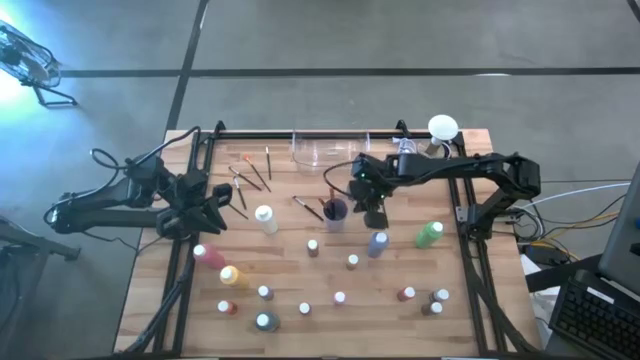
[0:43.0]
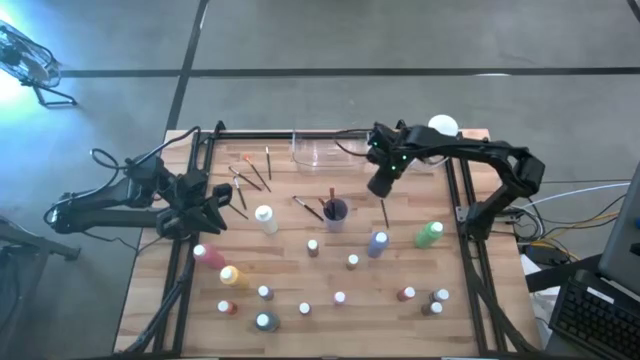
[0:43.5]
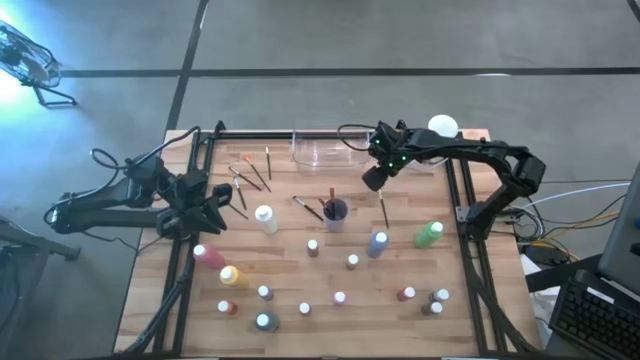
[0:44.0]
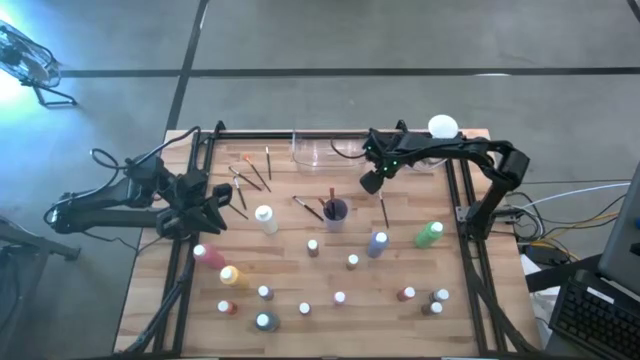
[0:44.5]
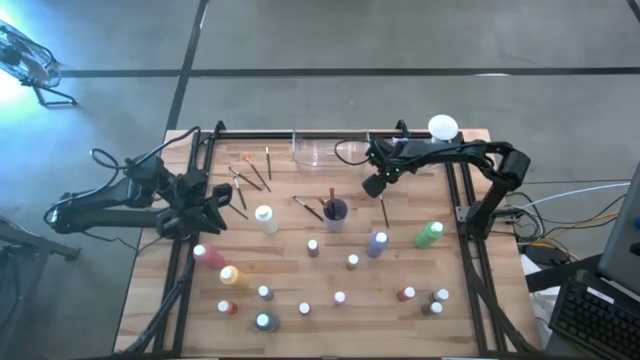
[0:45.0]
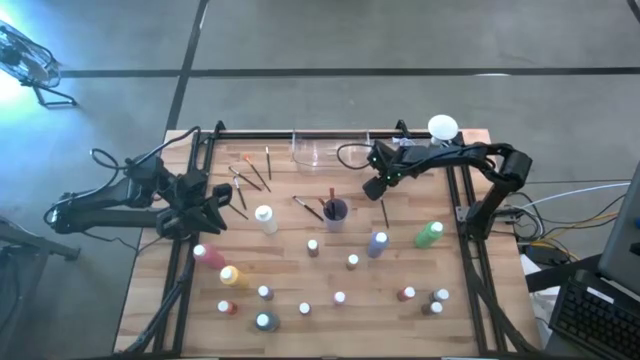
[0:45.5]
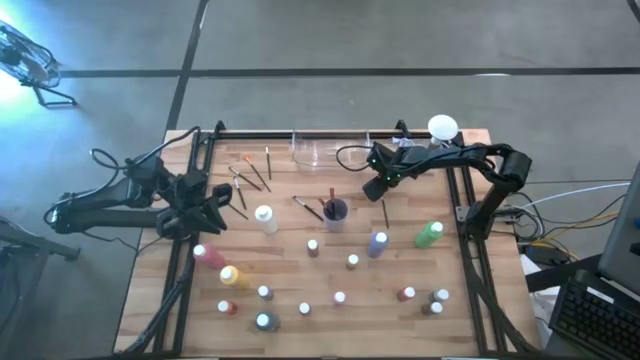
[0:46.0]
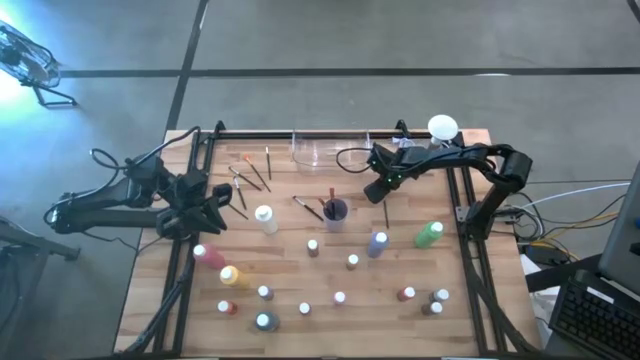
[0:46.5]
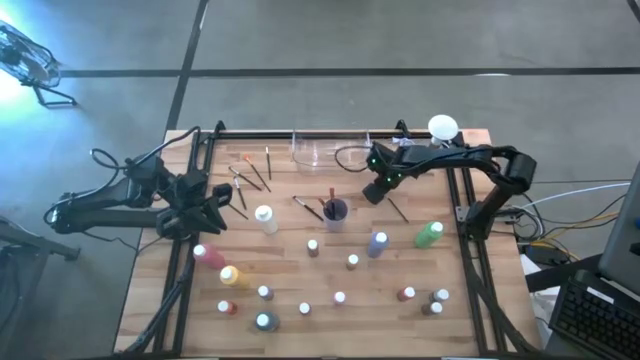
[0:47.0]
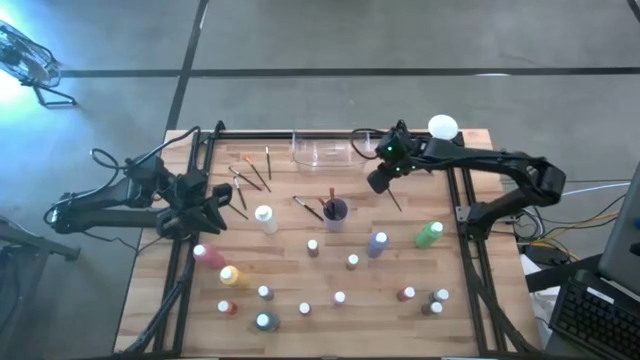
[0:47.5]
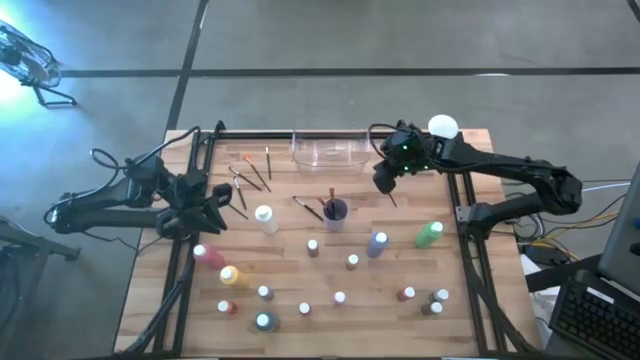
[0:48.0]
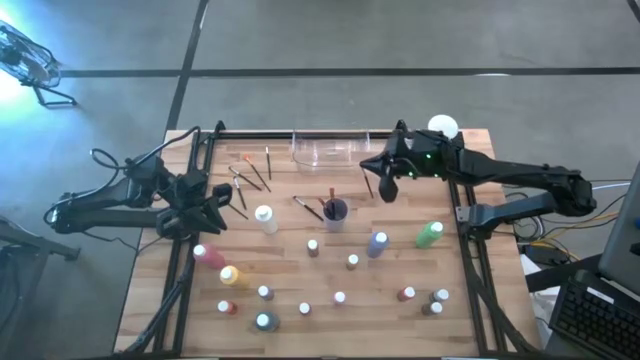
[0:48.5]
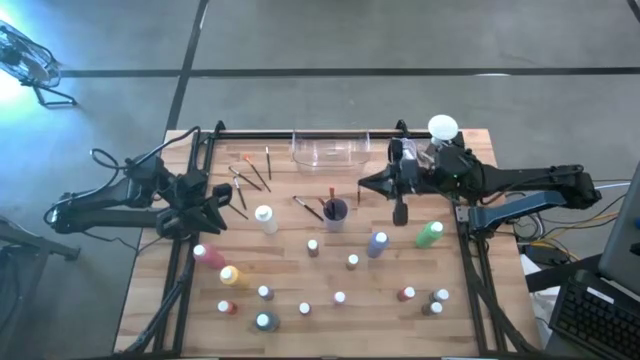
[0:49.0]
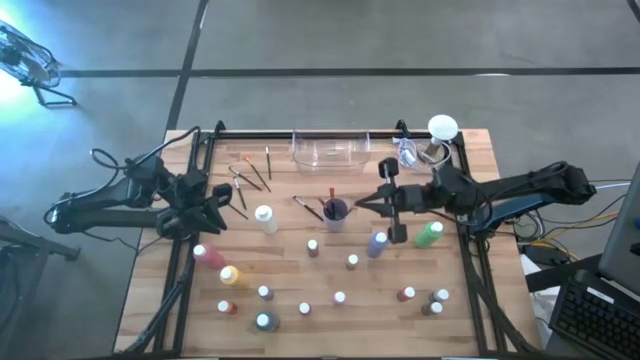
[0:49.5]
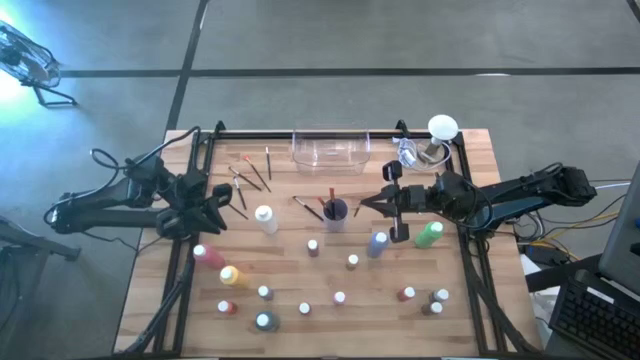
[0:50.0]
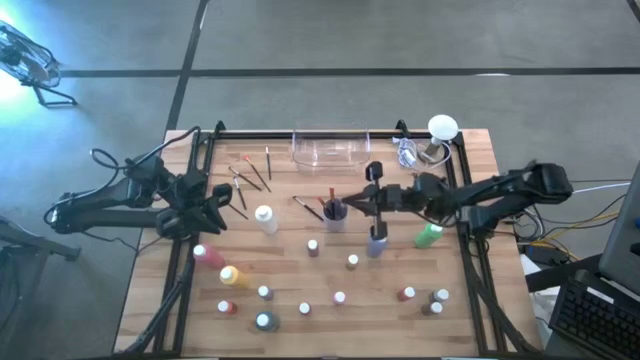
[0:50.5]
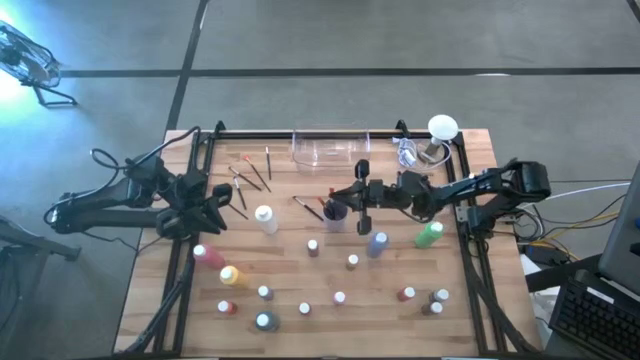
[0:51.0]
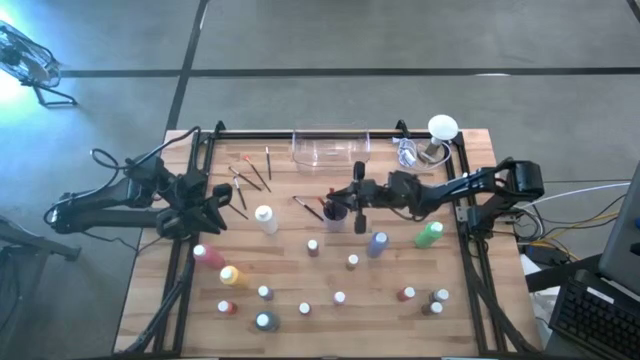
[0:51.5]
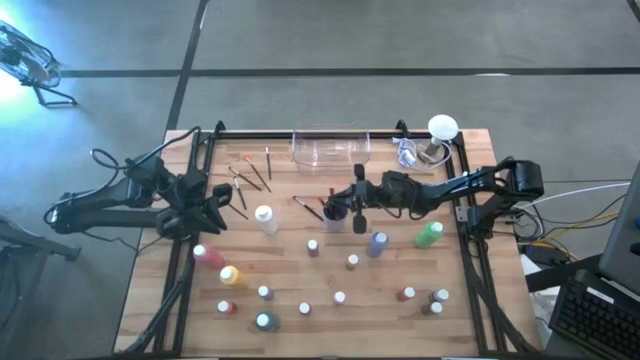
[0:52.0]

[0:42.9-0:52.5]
Task: Pick & Place Paint Supplies
Put the silver paint brush into the purple cup

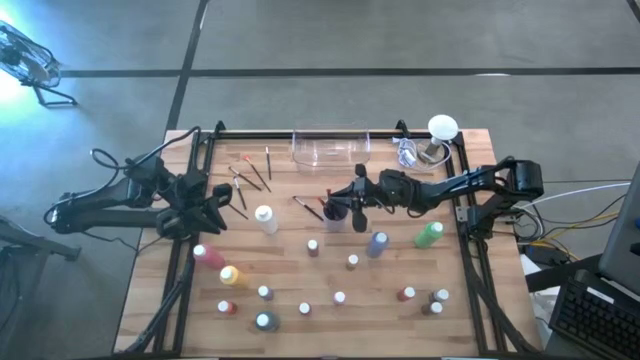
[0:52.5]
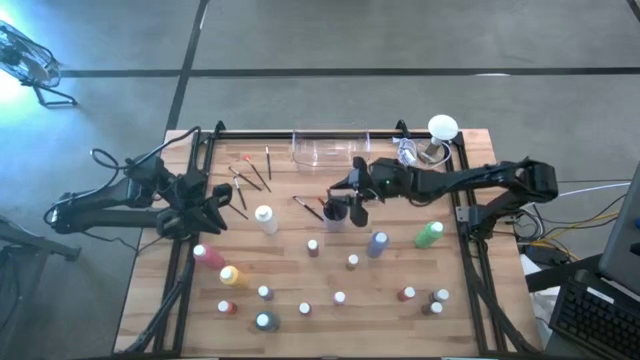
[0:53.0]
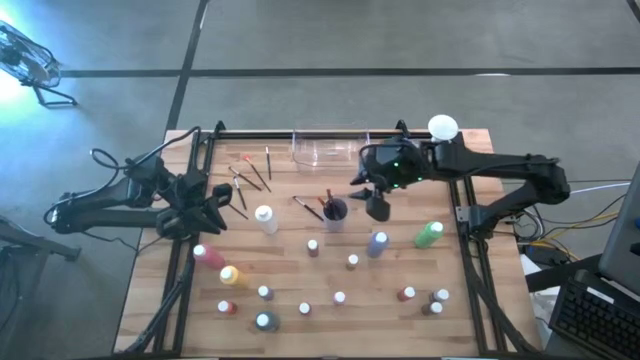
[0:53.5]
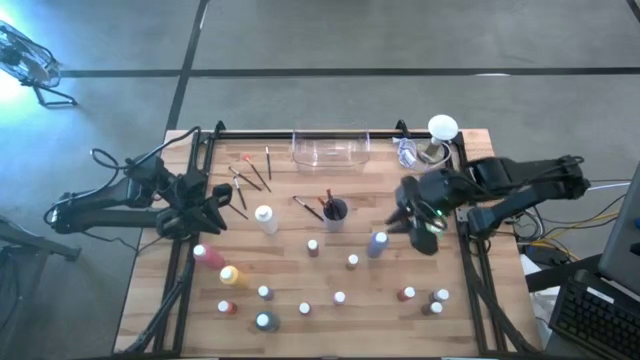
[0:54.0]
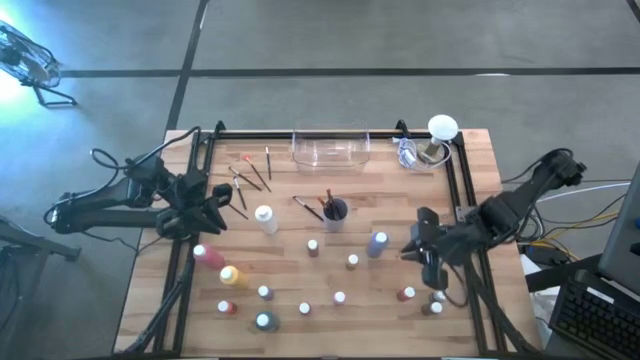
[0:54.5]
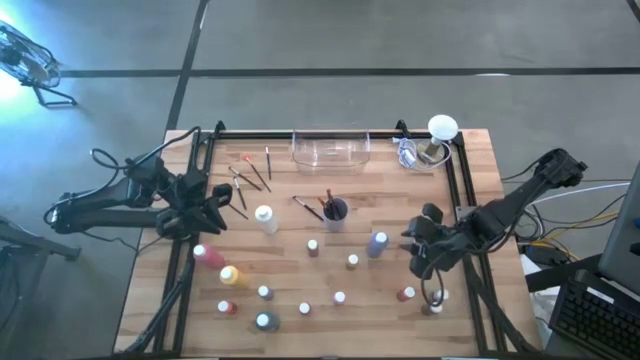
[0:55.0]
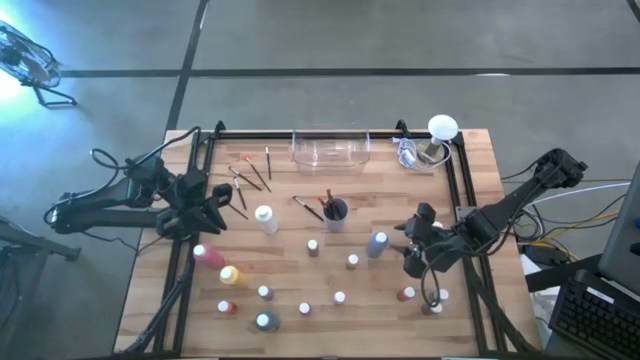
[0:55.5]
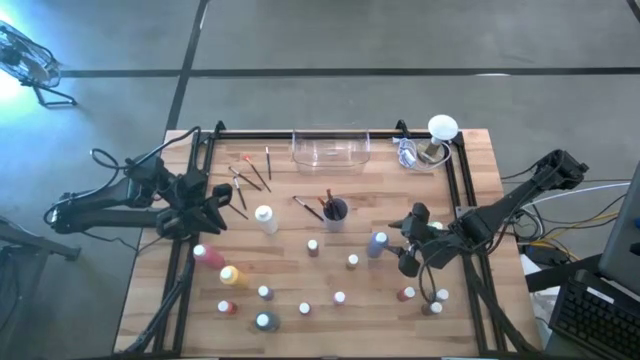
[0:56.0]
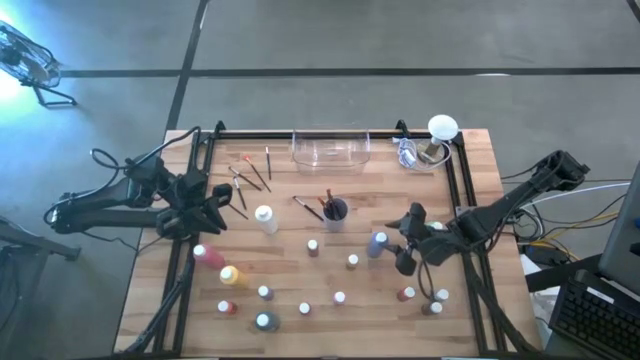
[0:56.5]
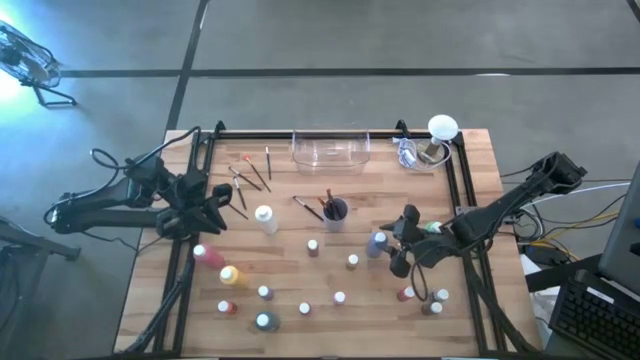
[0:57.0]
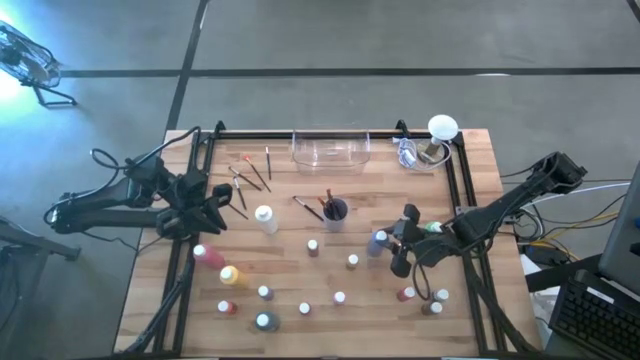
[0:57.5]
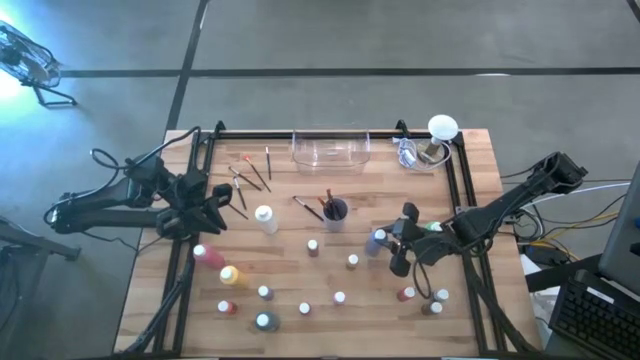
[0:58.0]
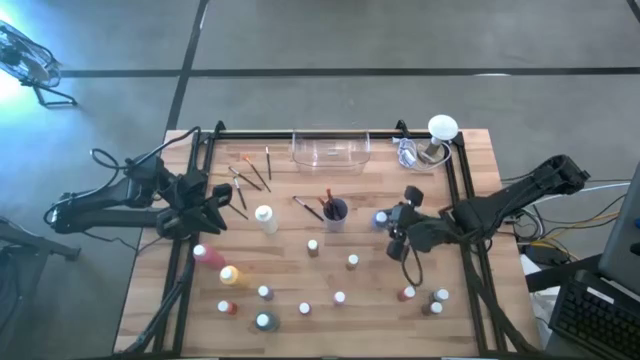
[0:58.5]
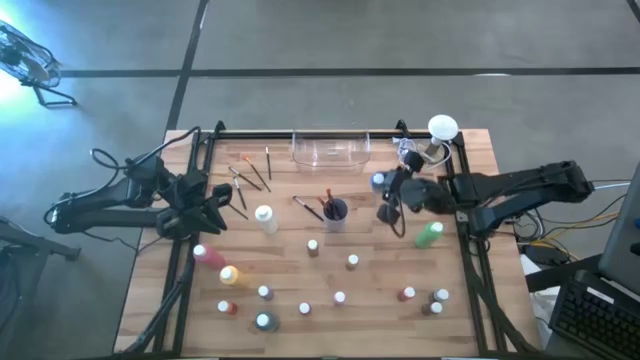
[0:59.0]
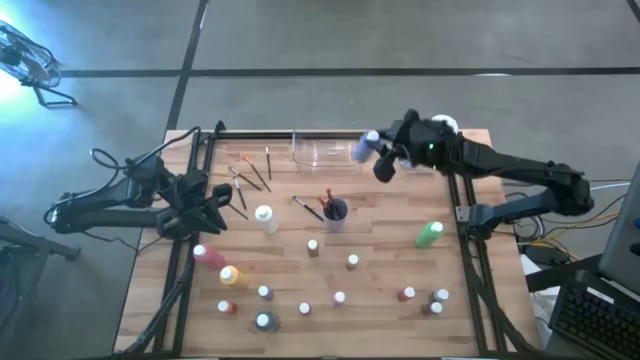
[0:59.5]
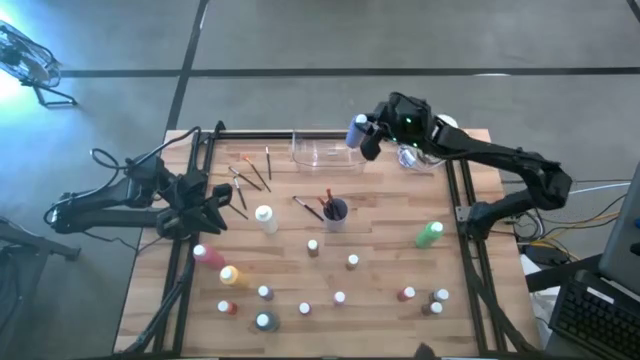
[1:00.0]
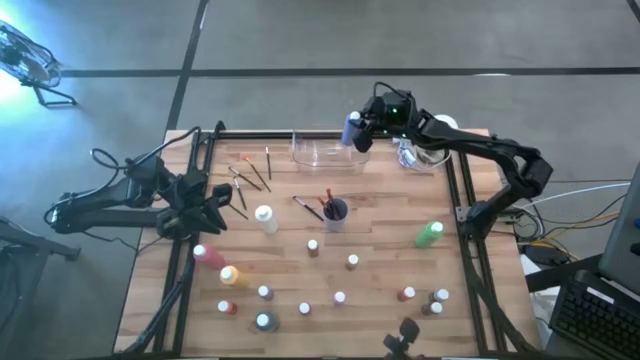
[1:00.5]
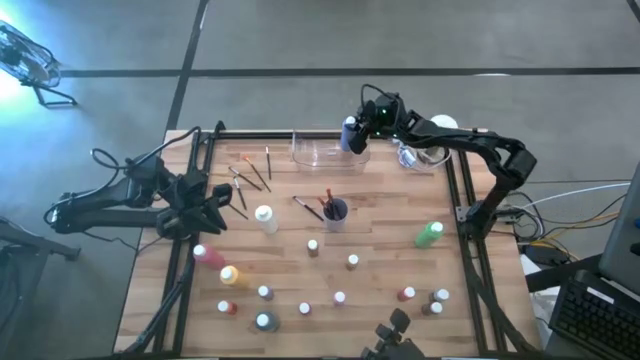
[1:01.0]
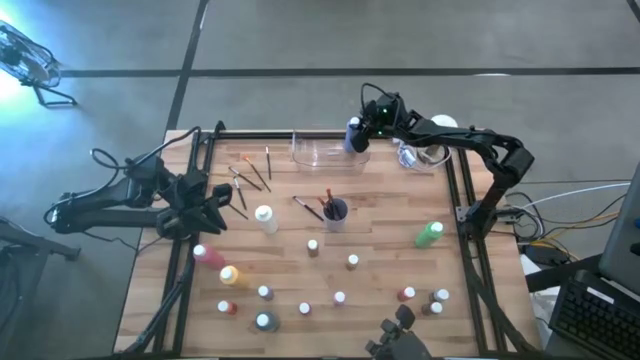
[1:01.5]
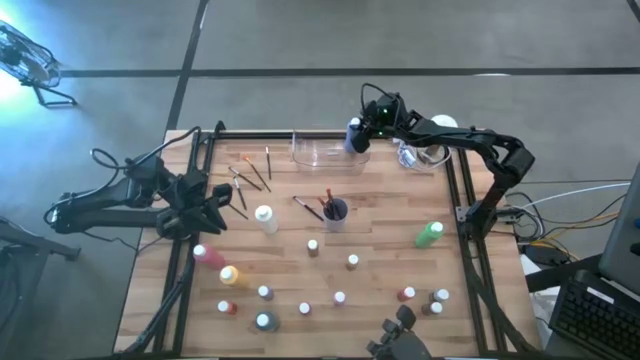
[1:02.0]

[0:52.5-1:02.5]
Put the blue paint bottle into the transparent bin

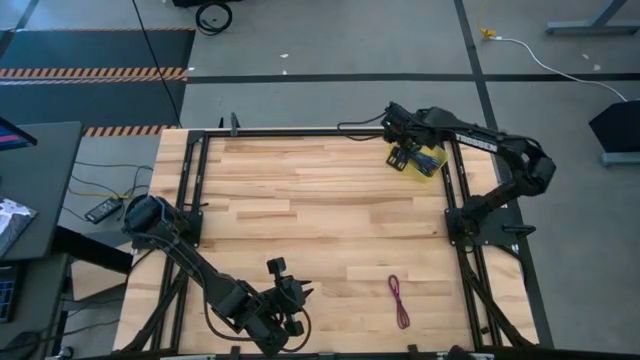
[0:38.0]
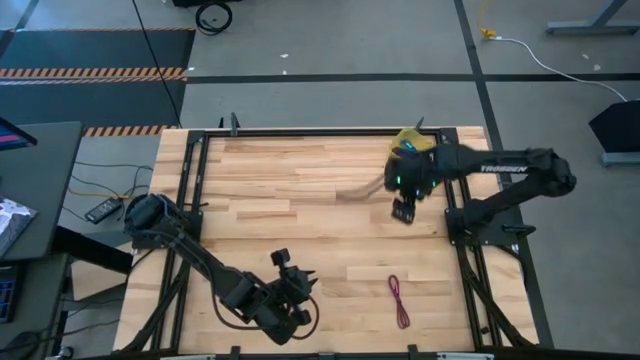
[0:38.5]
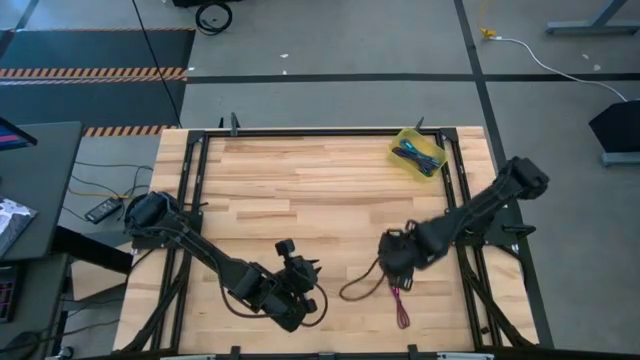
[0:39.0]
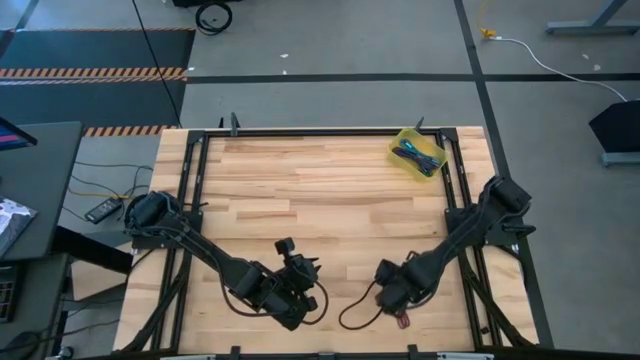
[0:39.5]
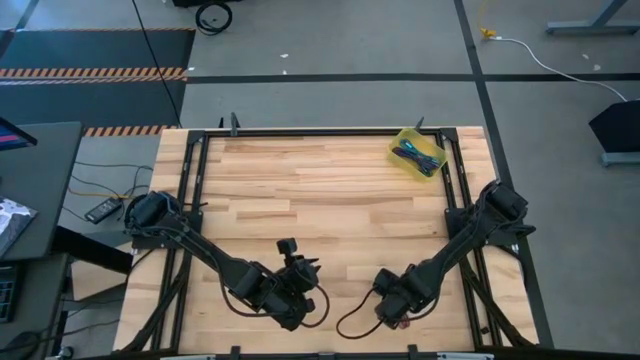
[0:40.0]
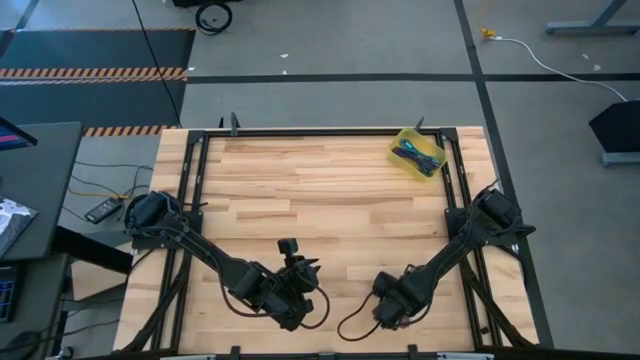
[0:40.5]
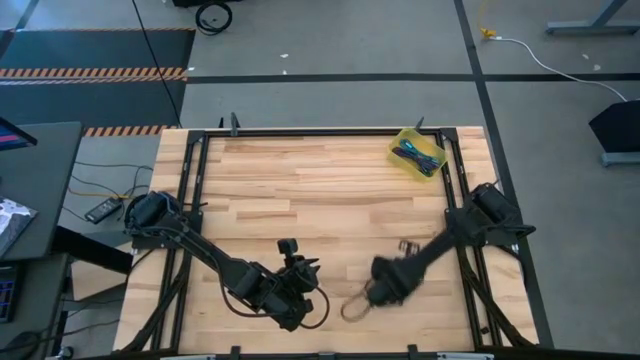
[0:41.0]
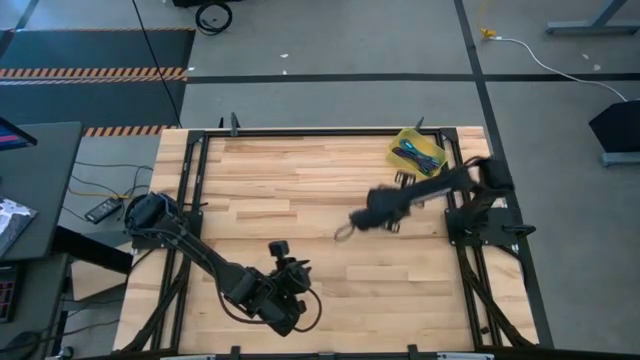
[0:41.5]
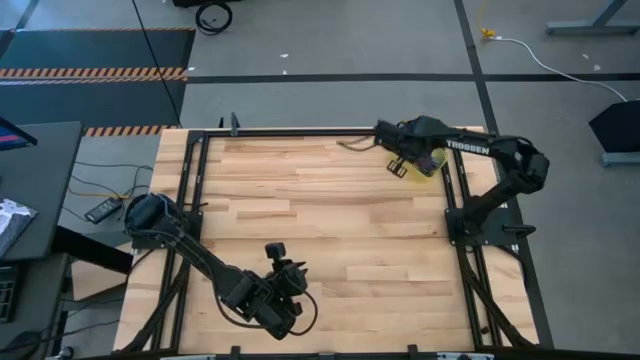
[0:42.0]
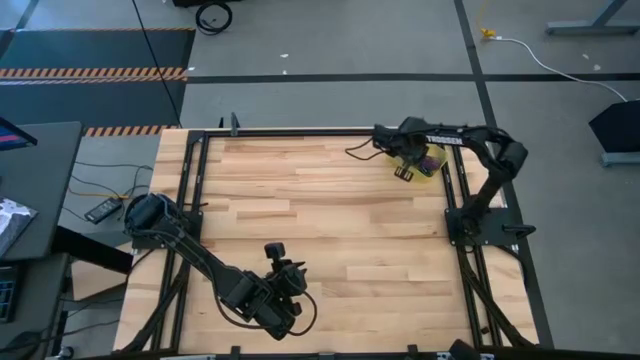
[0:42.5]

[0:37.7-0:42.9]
Task: Pick and place USB-C Cables
Put the pink charger cable into the yellow container
